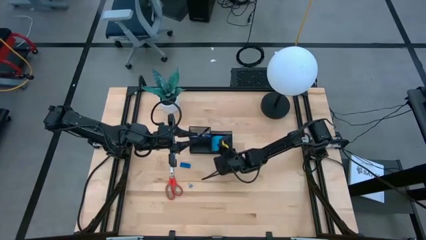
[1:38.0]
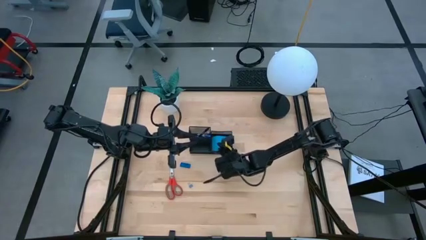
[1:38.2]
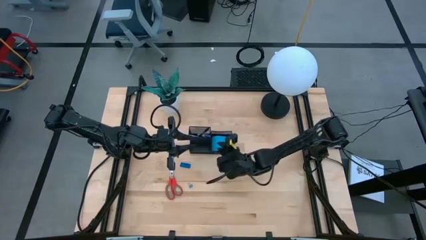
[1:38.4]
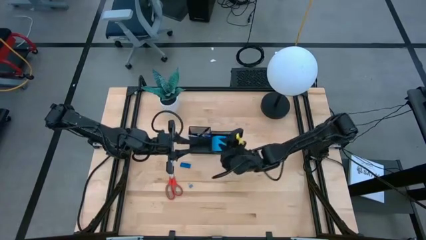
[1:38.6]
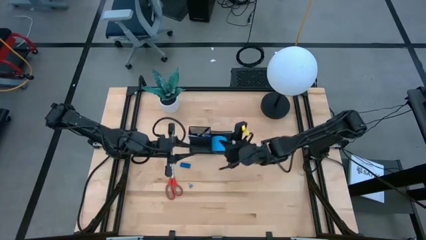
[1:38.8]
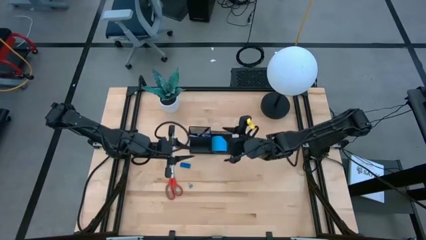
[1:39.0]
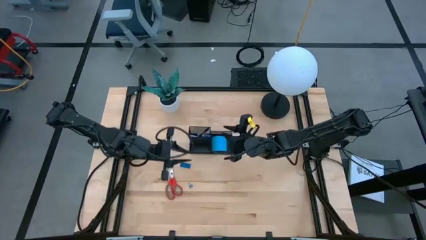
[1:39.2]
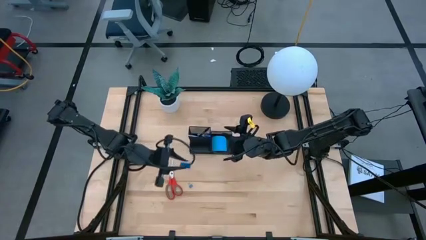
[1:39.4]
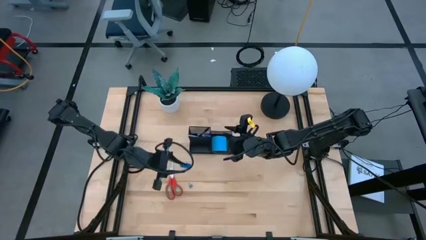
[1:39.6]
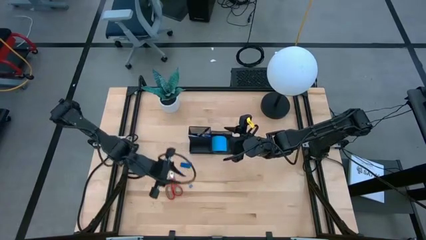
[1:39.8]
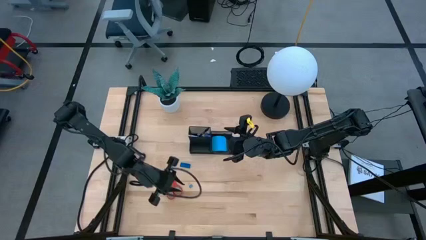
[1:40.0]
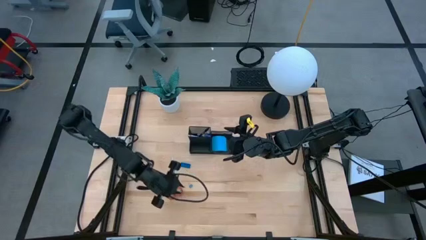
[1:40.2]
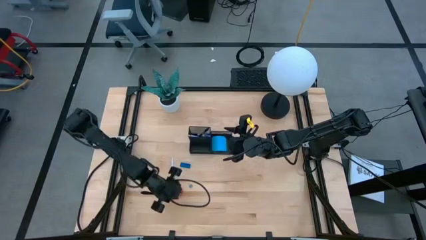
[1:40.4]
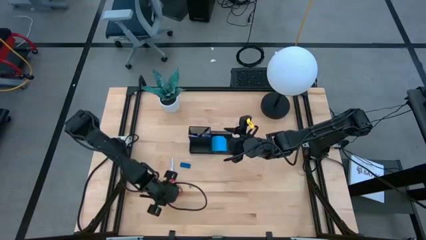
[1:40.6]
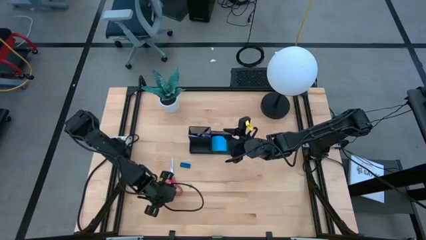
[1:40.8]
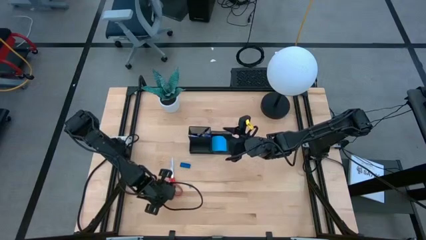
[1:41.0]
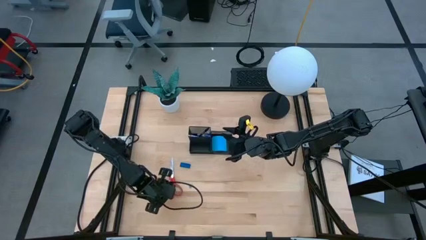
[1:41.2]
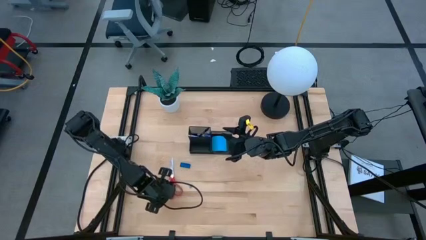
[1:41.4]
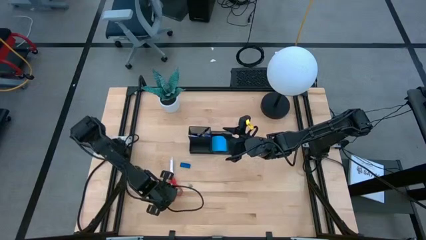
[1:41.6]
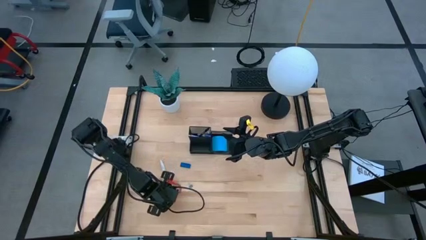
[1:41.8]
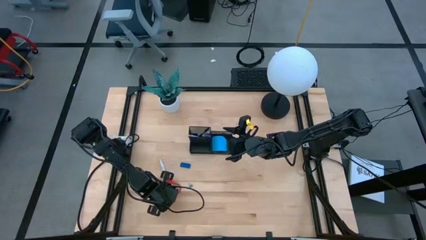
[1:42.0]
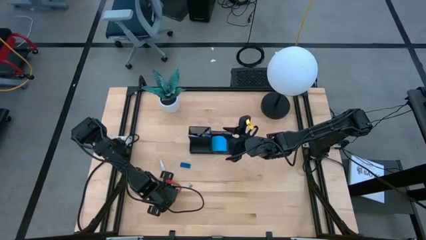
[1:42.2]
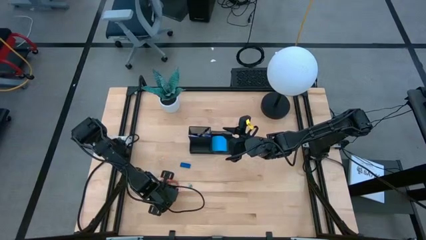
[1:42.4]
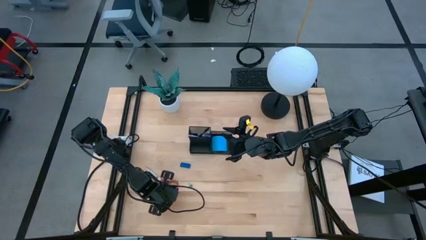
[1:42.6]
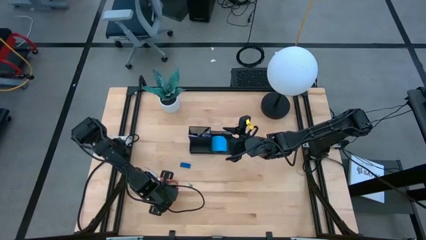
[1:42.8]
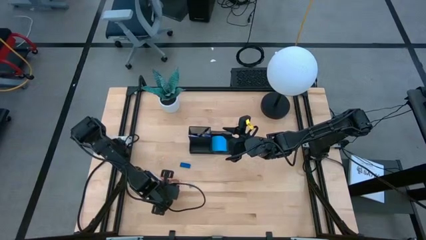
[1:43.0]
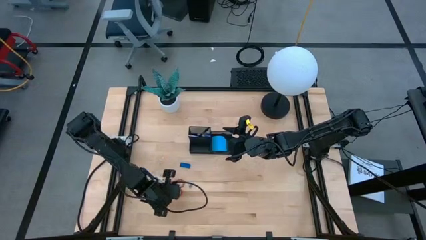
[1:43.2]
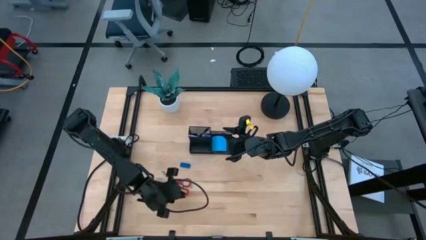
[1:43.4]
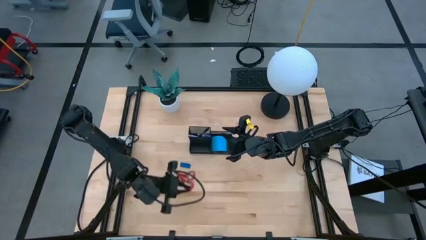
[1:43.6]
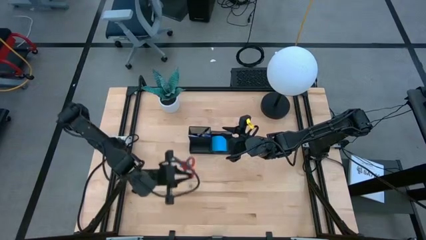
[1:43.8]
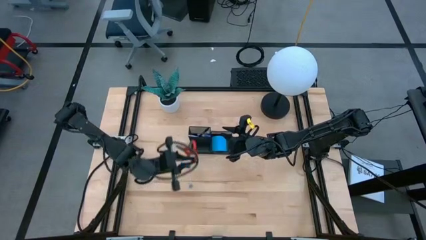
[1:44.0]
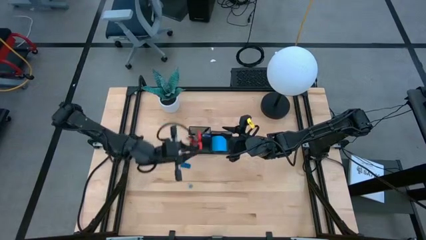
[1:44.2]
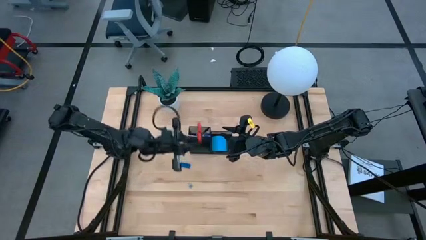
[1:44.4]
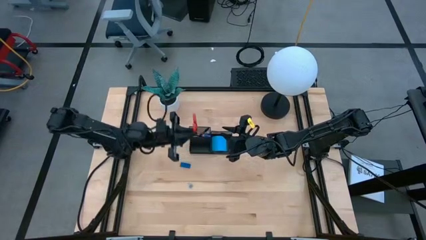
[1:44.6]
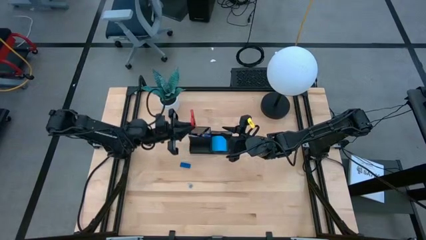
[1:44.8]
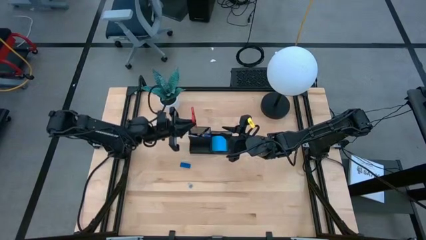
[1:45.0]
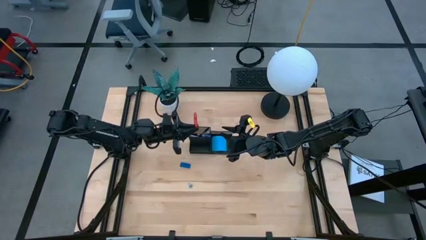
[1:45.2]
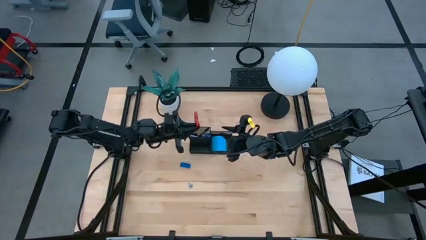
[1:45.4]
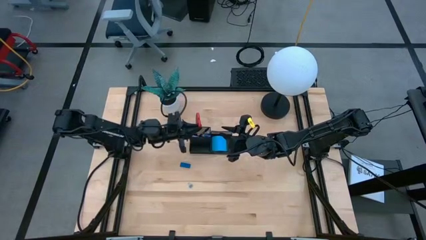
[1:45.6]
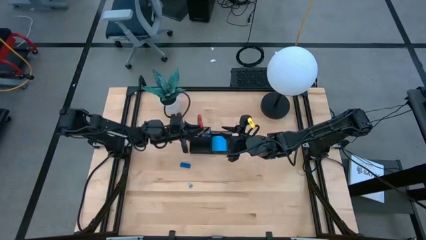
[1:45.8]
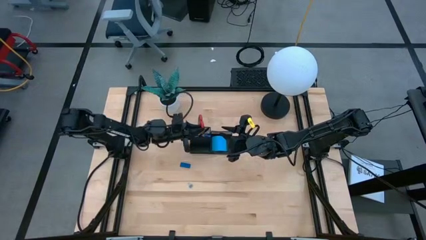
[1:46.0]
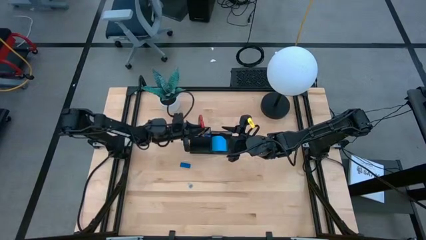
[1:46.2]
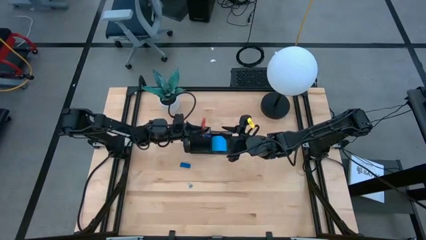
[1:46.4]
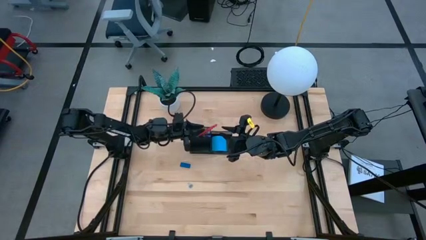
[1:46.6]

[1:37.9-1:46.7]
Task: Pick and place office supplies into organizer
Put the red scissors into the black desk organizer

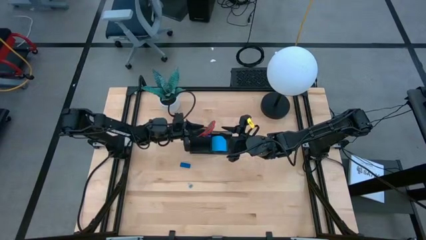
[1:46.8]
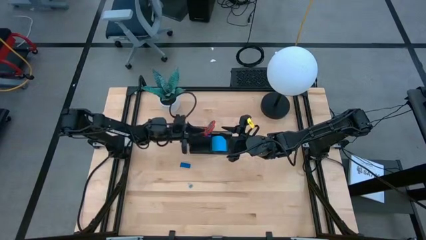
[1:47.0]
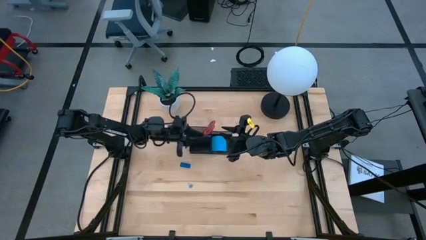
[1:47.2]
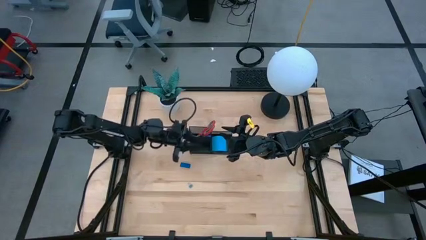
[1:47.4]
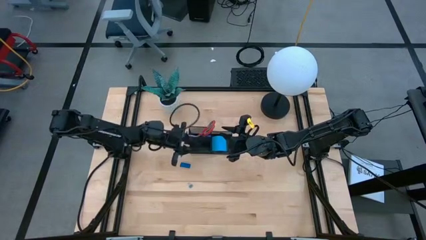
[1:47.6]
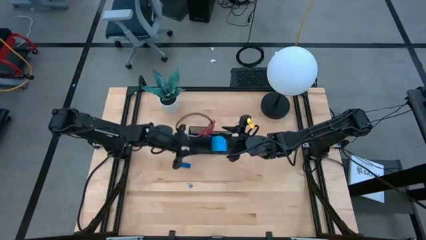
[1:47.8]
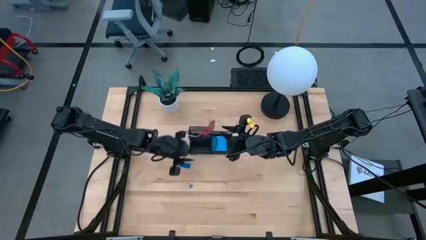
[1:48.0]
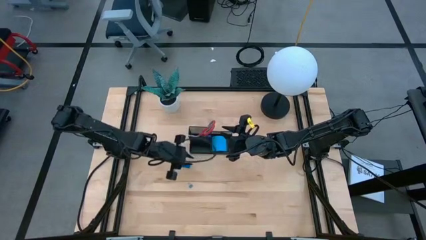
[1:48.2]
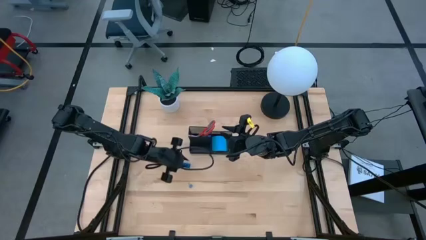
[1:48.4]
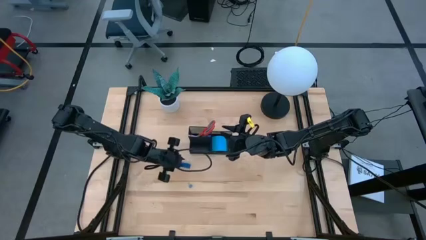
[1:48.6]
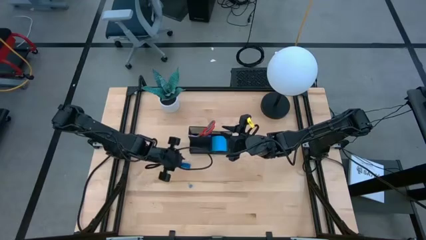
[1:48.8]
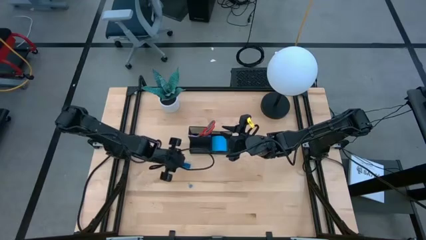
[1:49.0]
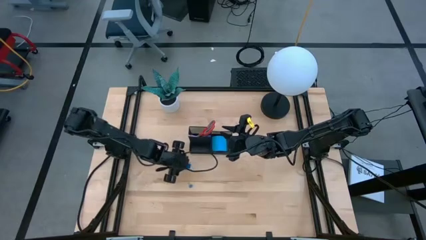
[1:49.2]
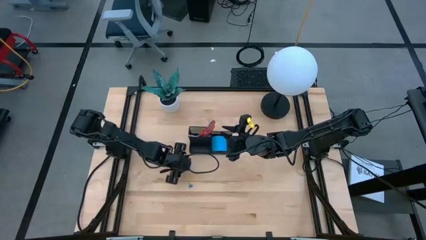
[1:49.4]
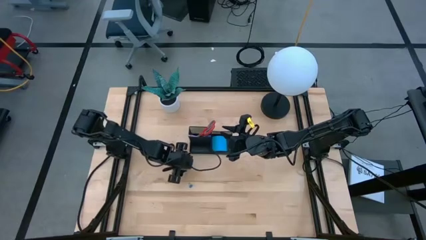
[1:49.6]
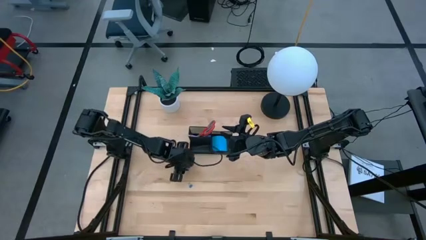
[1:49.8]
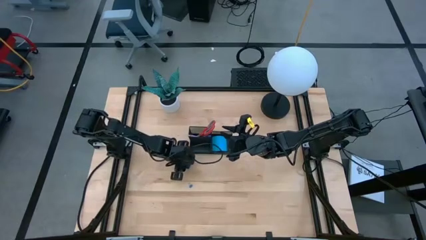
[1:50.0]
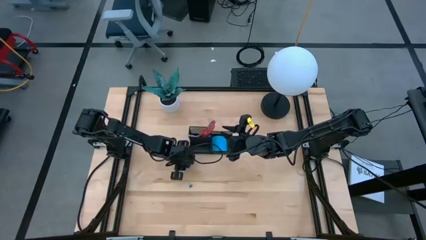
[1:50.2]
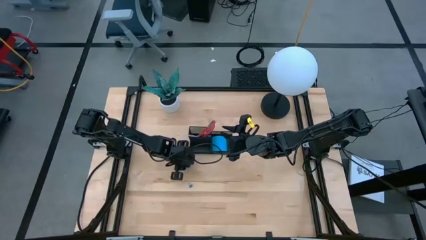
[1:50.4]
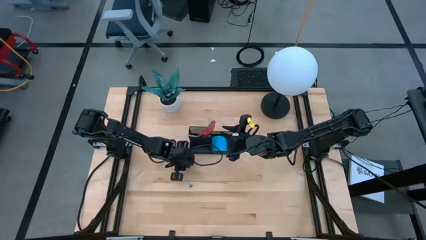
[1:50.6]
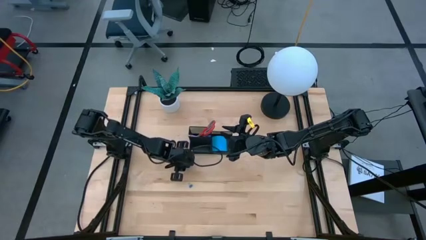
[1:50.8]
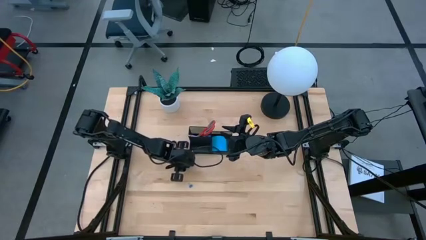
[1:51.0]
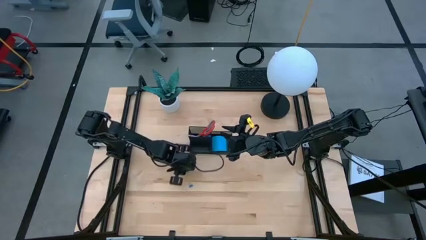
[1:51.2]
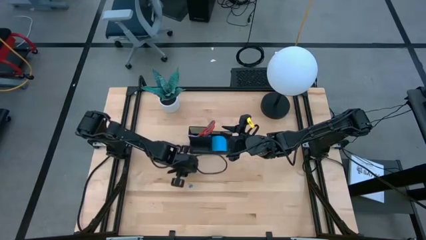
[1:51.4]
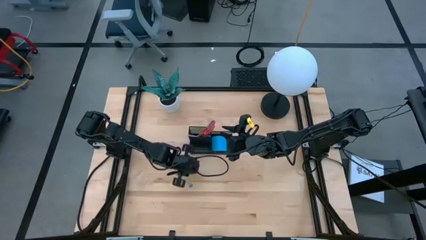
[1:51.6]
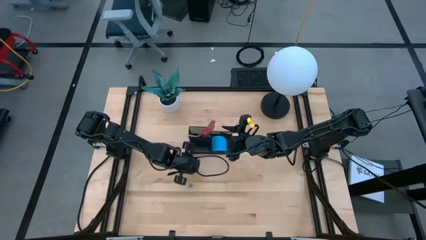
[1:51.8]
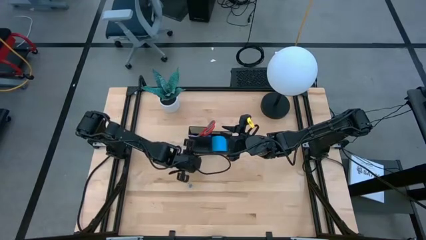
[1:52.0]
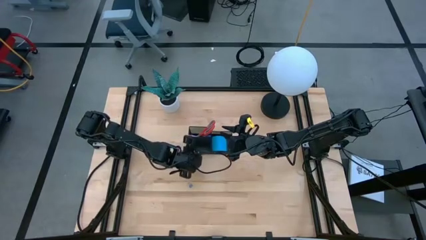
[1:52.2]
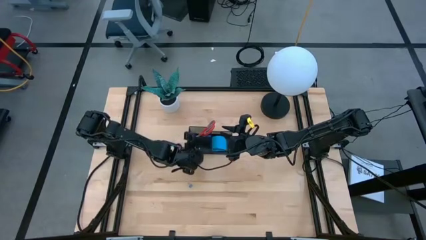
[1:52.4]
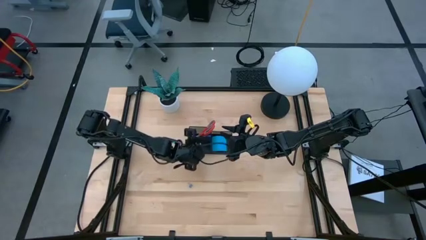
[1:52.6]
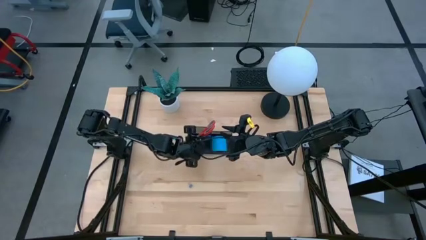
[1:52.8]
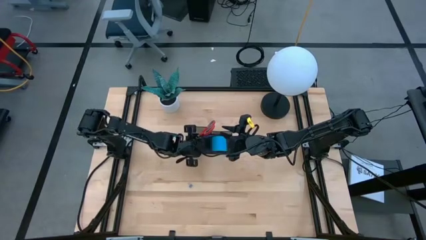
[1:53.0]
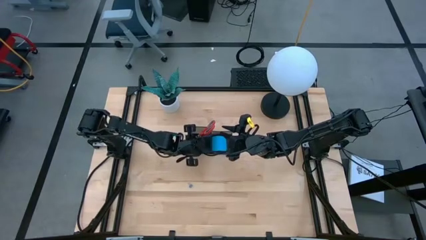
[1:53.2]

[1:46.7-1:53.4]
Put the blue eraser into the black desk organizer
